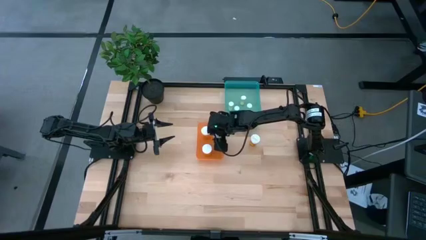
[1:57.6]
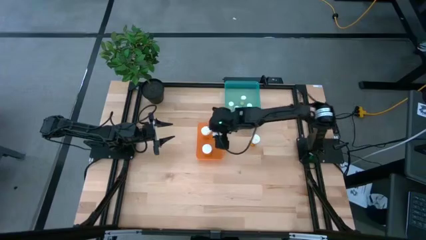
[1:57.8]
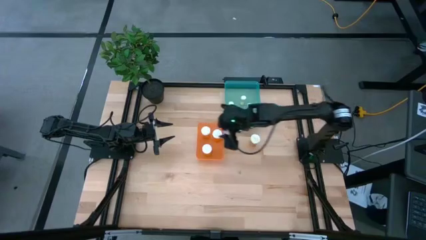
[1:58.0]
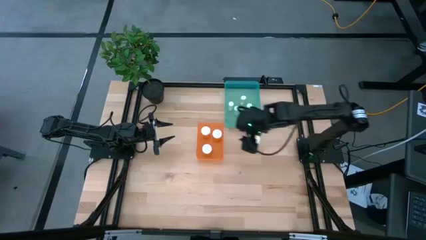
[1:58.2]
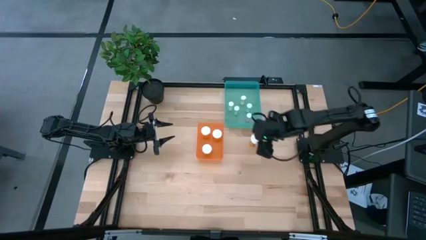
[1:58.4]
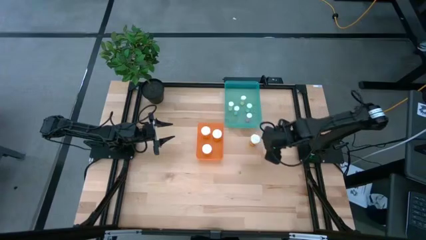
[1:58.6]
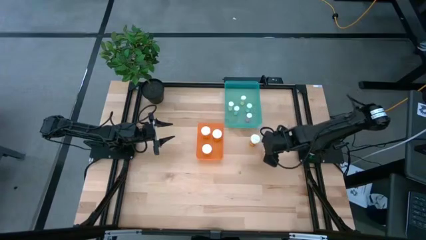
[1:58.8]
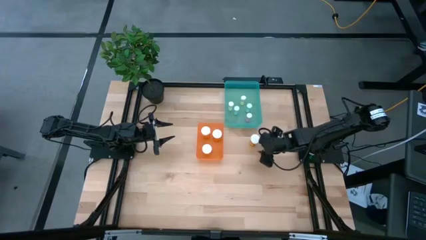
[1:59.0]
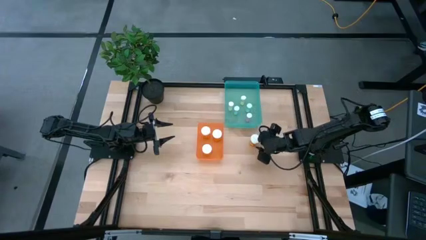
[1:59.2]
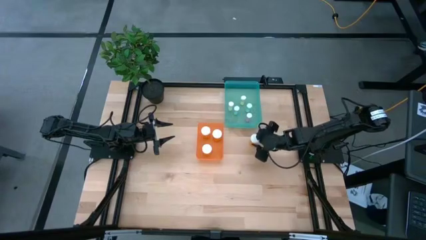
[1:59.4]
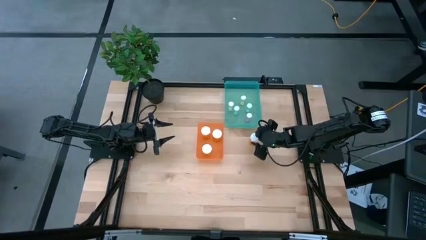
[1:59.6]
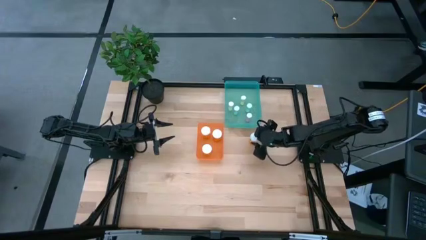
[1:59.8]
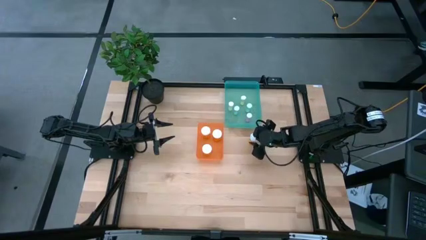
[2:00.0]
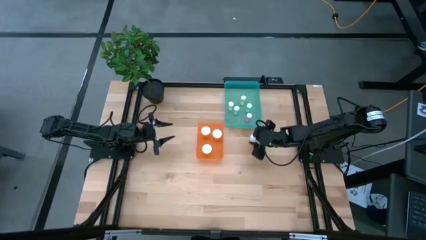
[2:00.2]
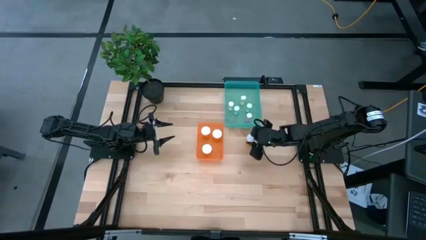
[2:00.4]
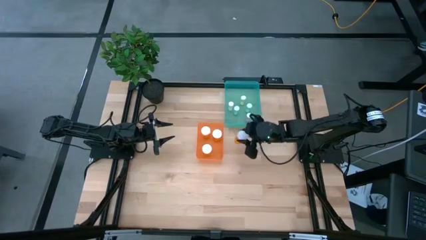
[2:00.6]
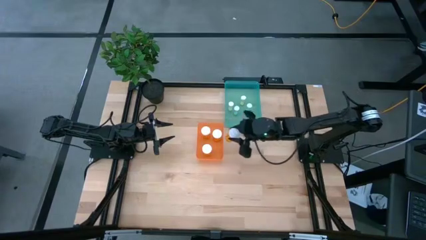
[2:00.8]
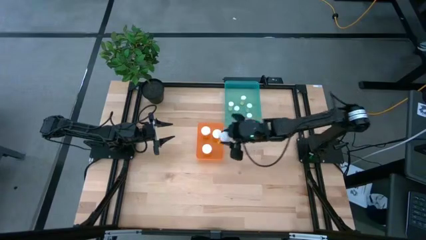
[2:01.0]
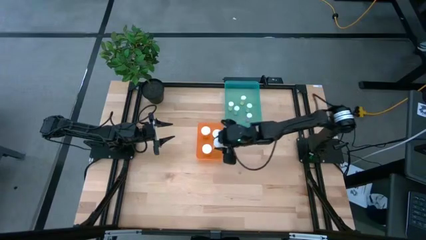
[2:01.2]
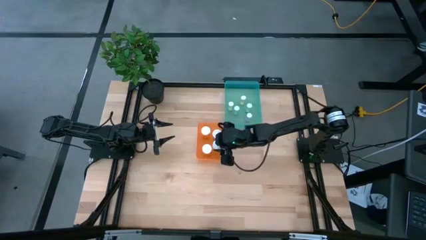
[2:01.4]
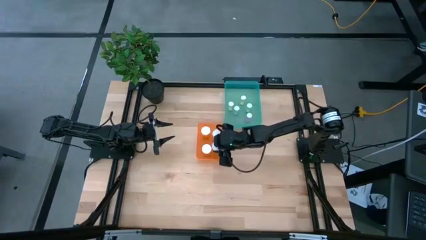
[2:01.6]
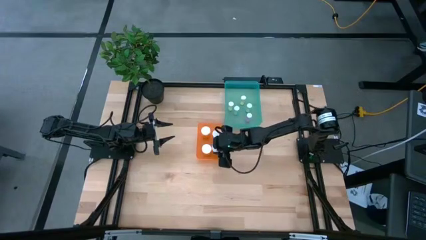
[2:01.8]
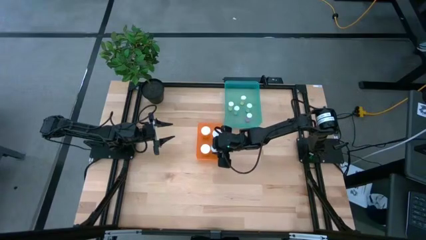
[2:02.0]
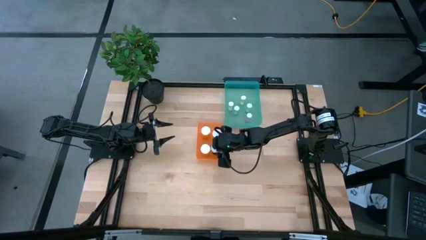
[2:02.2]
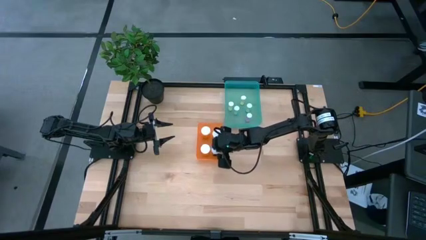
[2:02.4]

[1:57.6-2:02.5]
Task: Pick and place medicine bottles into bin by pill shape (circle, oval)
Put the orange capsule bottle into the orange bin

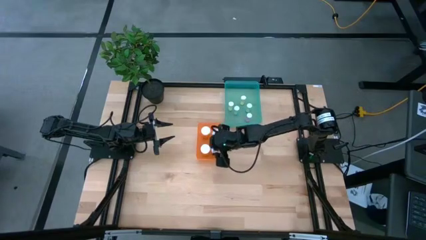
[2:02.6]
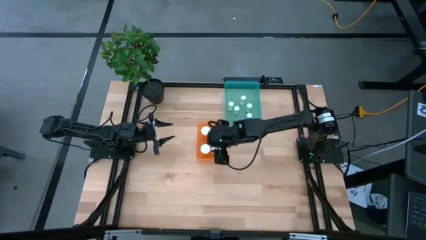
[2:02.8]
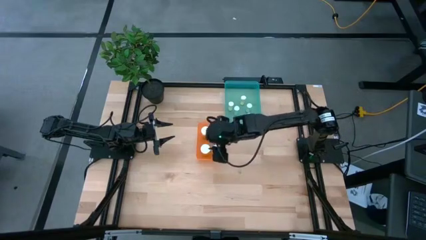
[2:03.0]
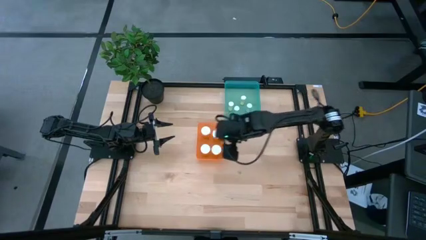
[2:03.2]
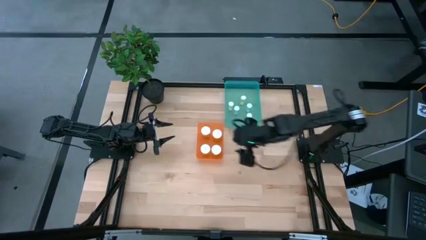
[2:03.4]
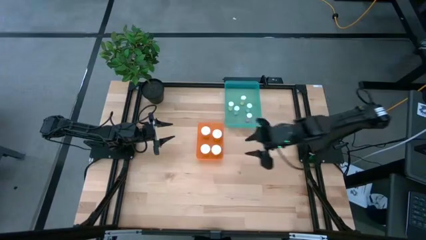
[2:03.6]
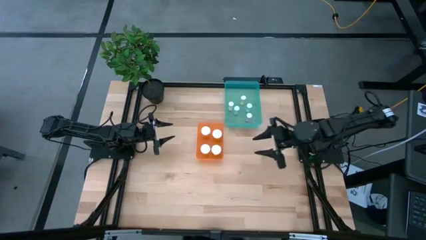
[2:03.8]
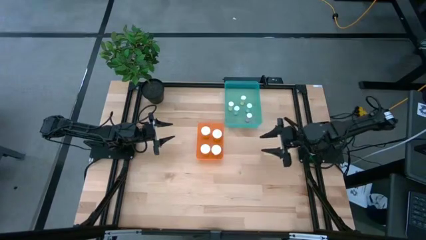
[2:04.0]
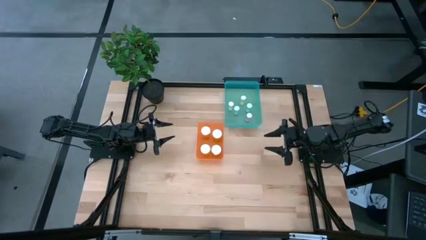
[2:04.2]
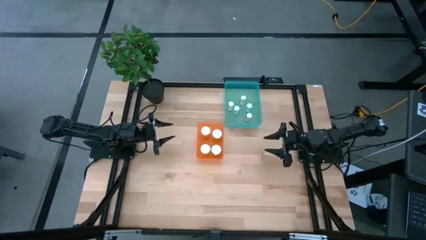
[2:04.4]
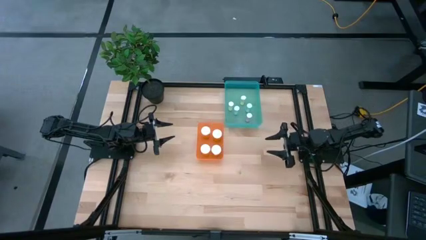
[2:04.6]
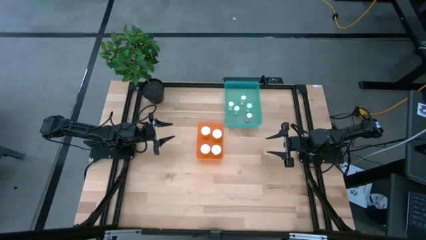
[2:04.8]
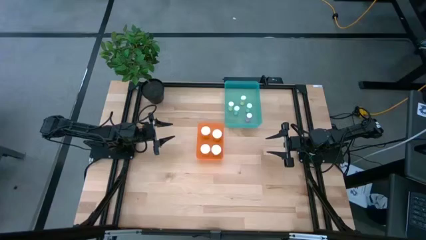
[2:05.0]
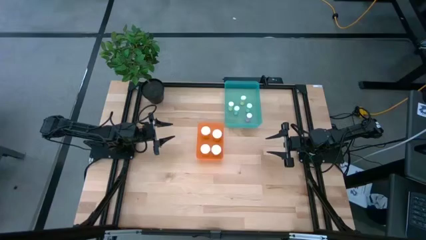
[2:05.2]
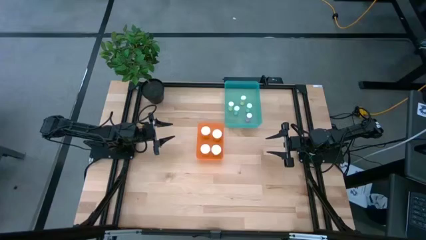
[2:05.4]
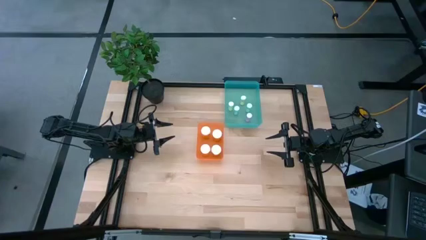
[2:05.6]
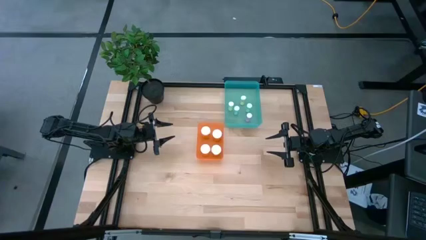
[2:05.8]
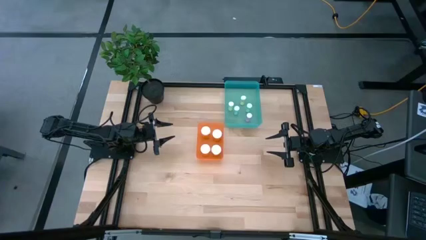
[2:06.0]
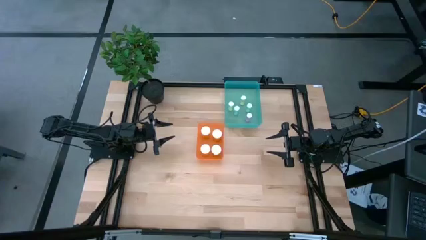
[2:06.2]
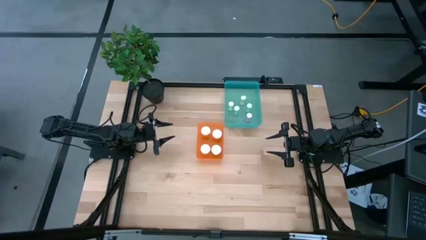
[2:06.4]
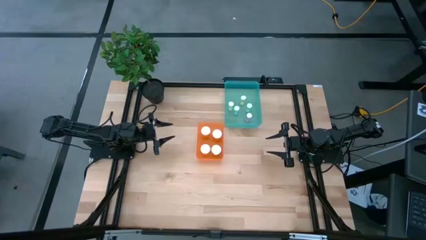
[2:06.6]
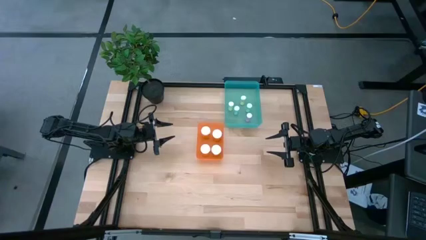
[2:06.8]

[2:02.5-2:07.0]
Return to Home Position

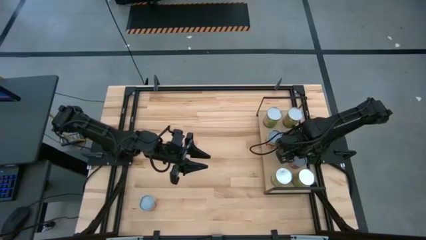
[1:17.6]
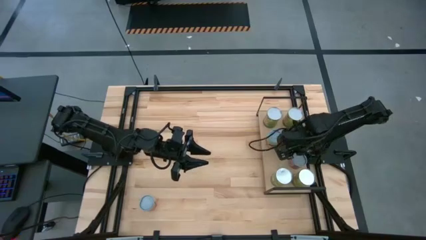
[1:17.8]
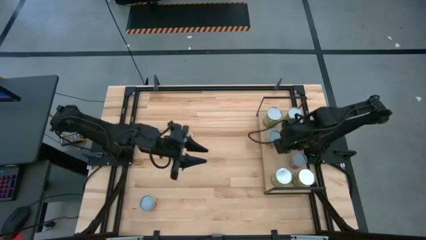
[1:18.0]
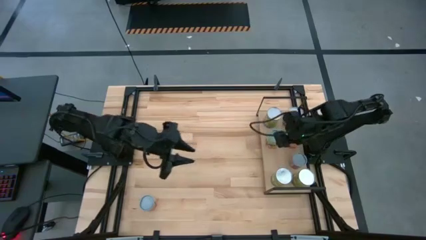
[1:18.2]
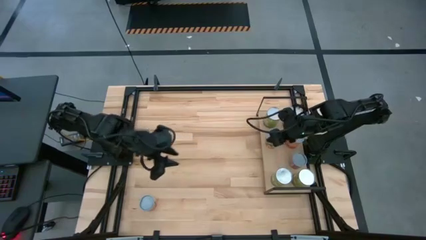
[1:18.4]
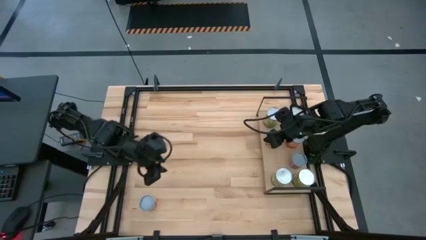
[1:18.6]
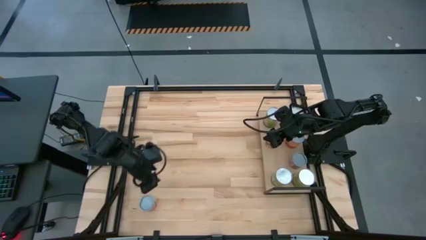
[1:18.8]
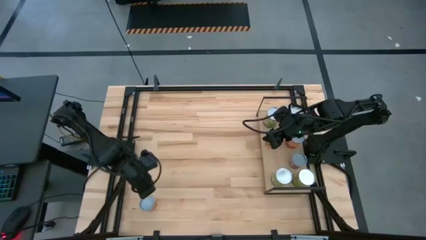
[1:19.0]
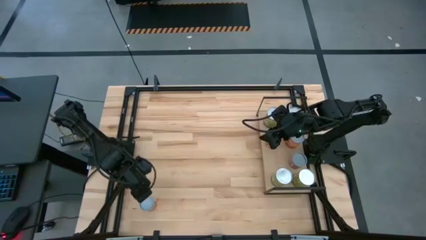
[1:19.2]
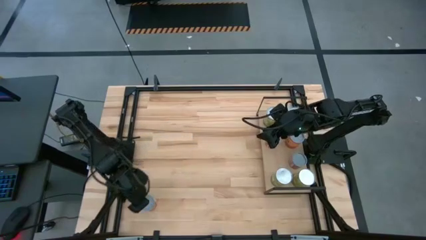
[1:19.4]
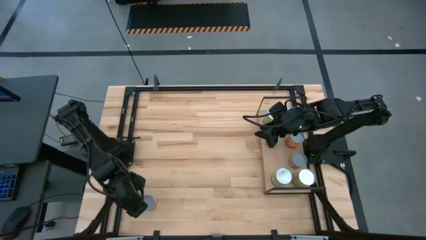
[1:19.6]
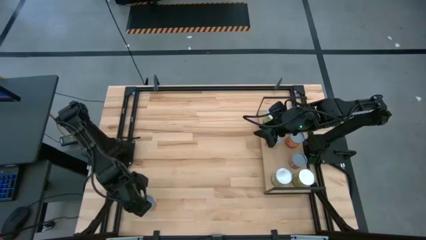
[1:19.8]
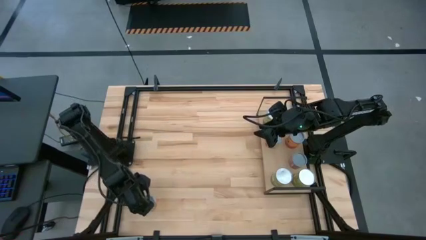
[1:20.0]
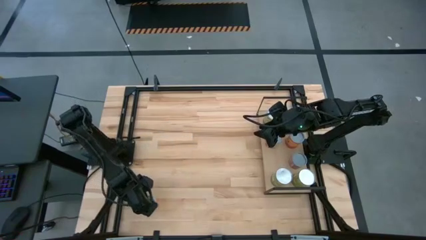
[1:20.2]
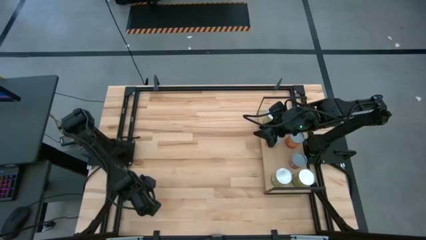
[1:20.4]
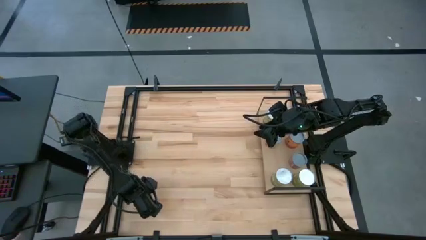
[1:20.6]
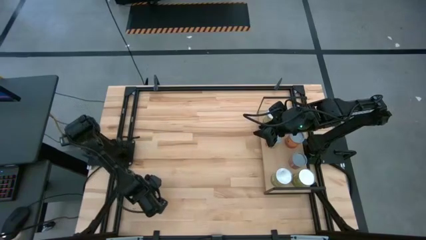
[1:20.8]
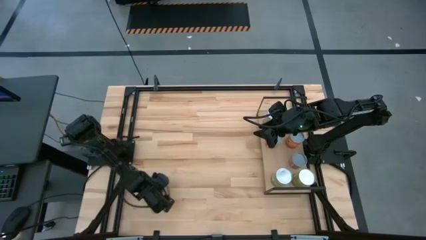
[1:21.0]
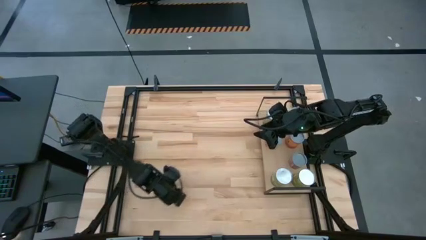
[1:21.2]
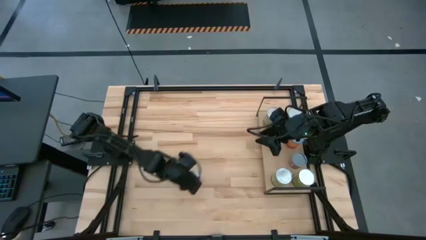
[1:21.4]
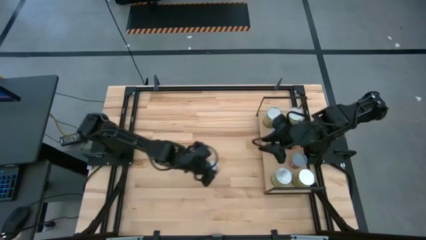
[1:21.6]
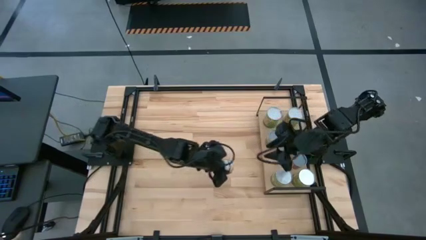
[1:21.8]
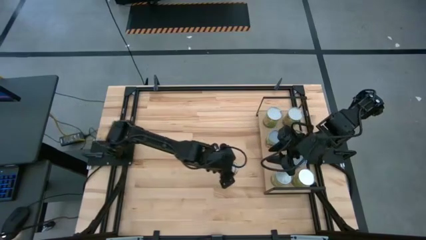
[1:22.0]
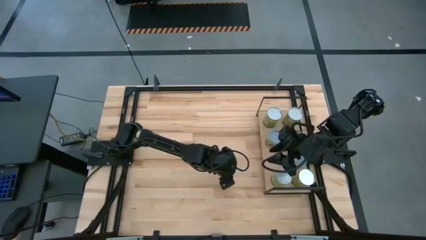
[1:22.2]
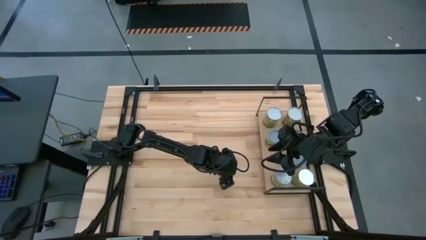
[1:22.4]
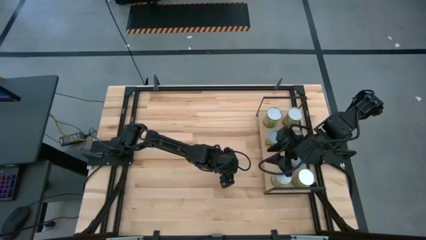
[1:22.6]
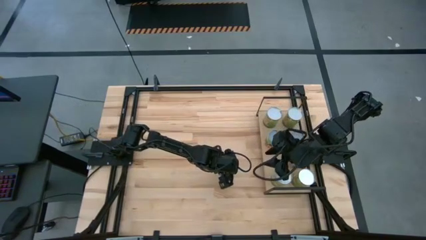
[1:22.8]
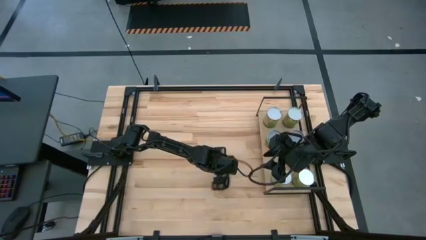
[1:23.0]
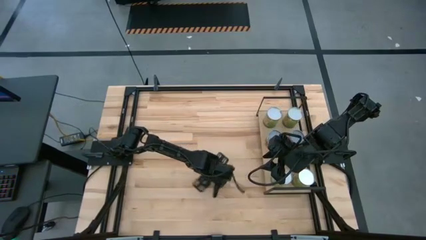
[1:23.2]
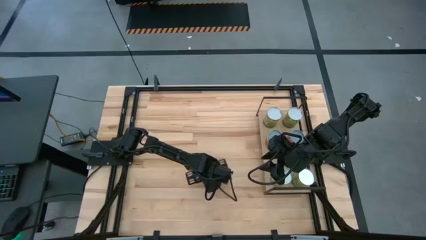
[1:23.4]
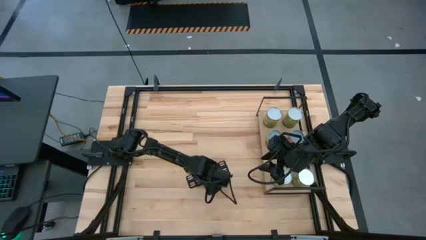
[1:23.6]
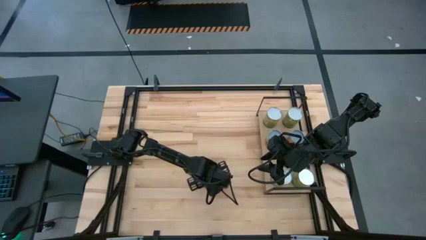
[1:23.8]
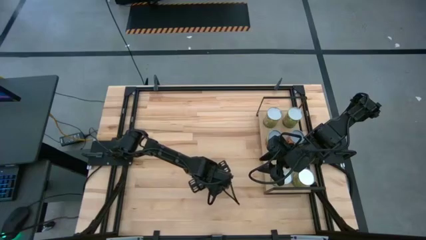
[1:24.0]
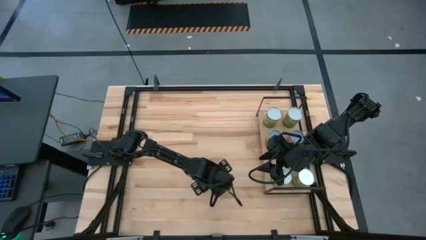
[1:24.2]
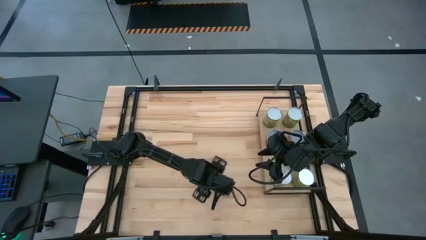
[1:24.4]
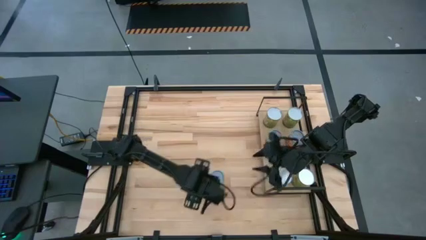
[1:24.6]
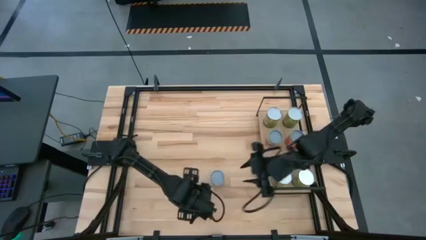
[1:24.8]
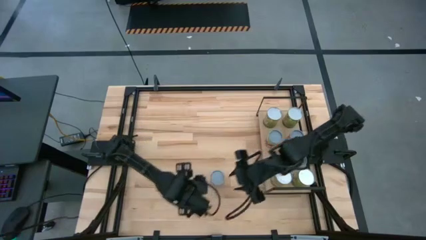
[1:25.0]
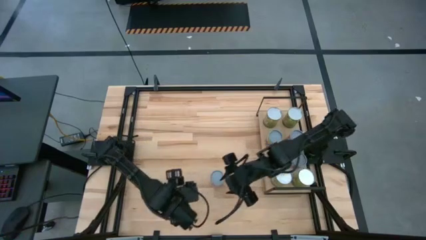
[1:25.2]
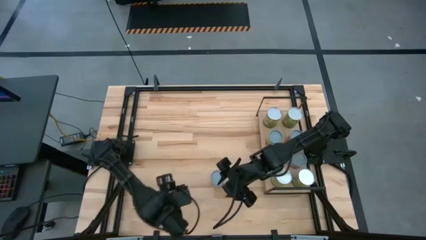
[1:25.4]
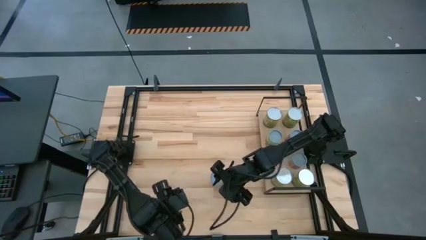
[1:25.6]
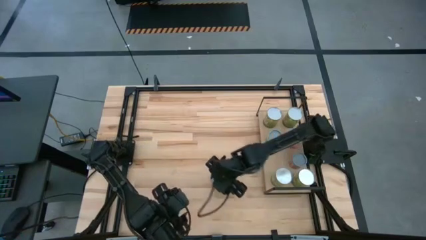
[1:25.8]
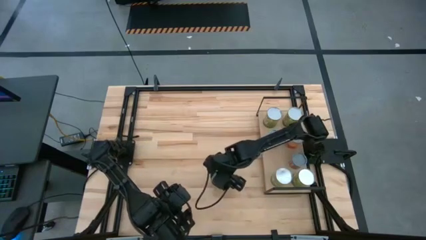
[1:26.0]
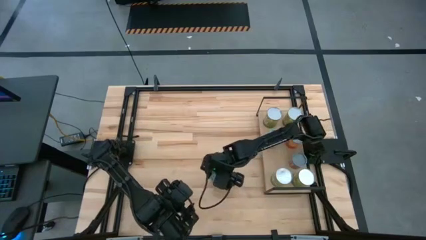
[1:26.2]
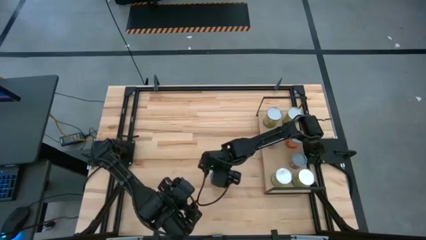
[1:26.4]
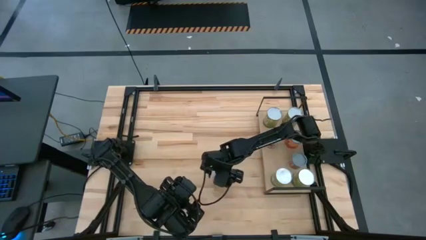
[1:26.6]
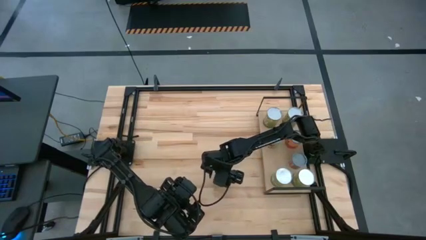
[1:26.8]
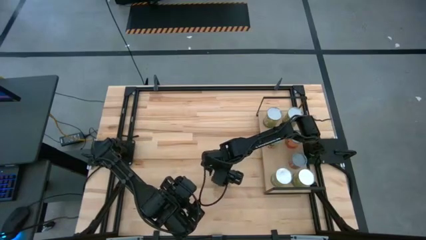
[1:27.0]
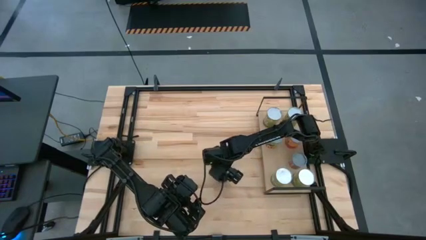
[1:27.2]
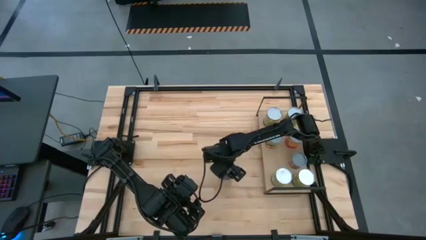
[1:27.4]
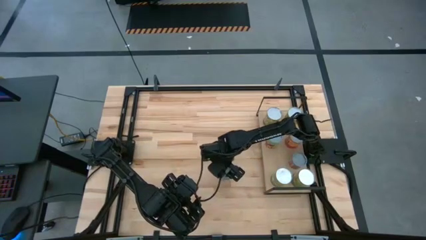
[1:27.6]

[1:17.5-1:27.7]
Task: Pick and place cans onto a shelf
Put the small canned oranges on the shelf
